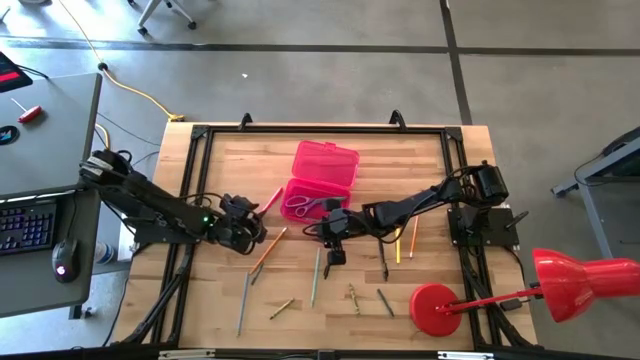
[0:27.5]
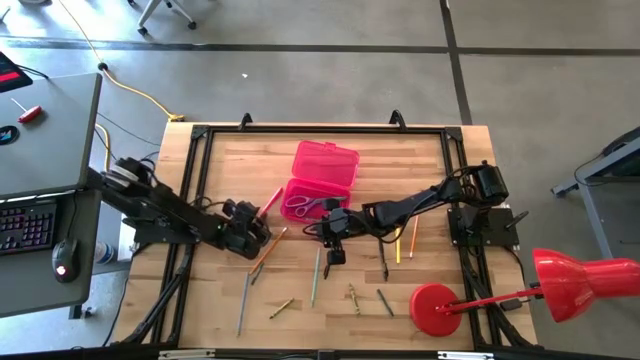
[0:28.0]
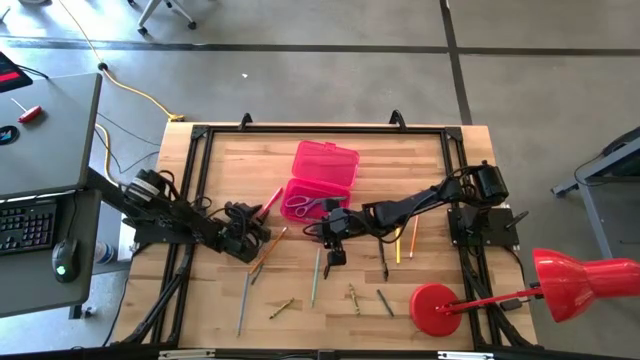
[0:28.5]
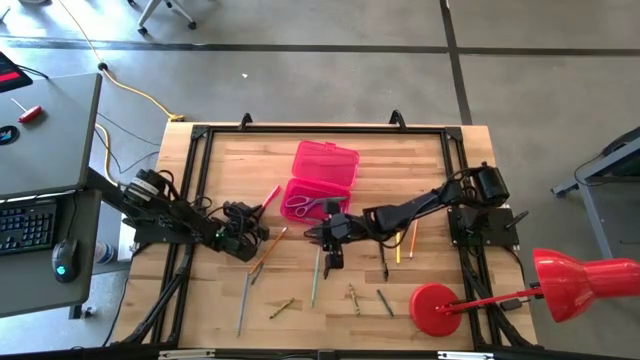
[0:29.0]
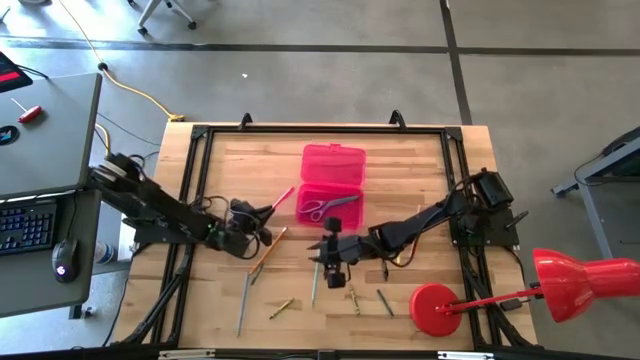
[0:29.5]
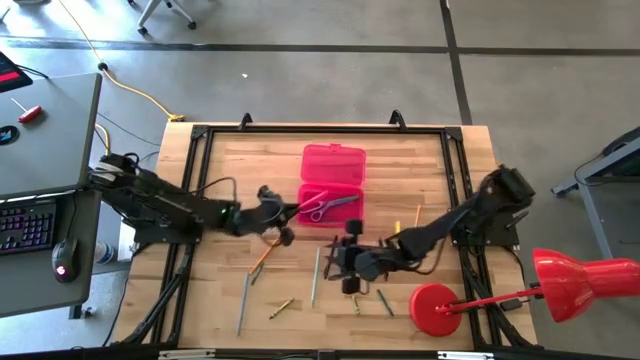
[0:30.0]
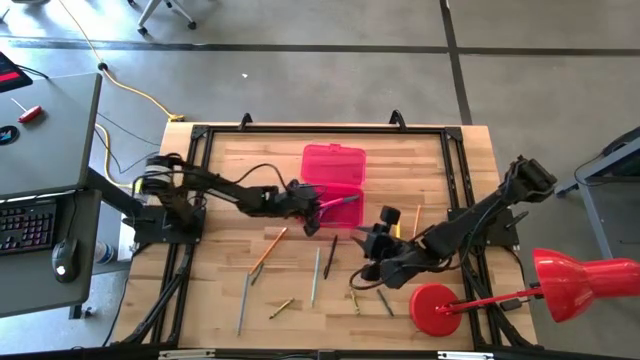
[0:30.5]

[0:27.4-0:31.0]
Task: Pick & place school supplies into a supply box
Put the pink pen into the pink supply box

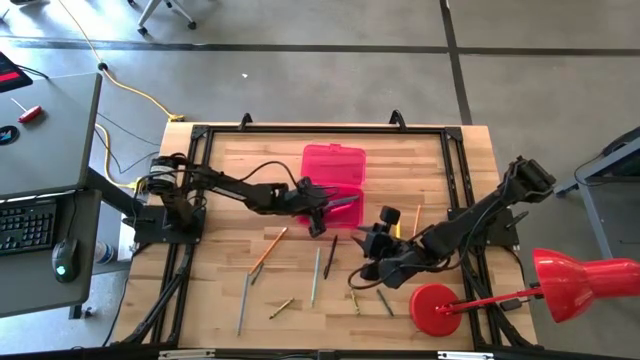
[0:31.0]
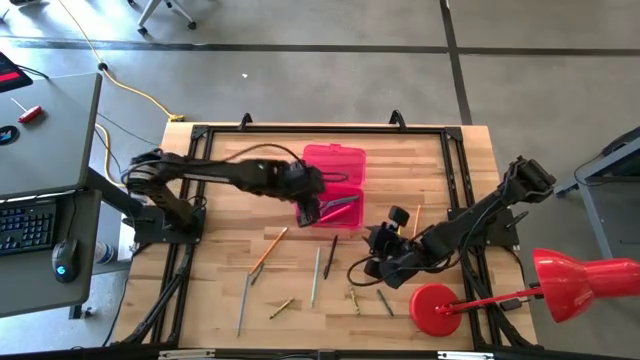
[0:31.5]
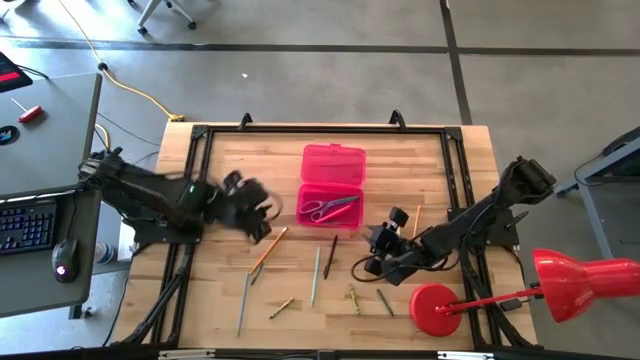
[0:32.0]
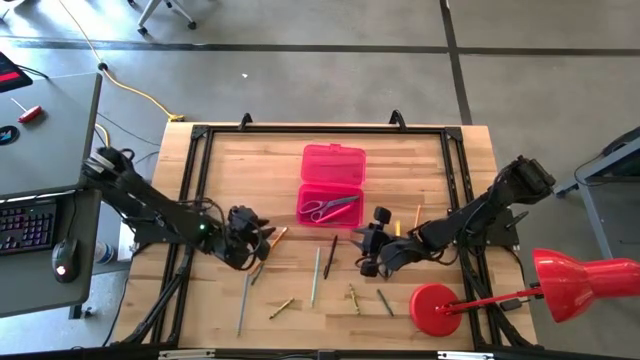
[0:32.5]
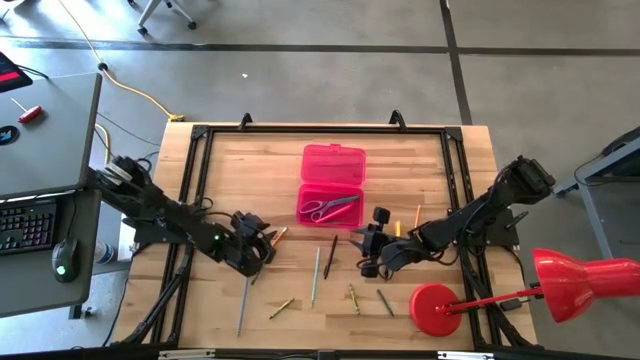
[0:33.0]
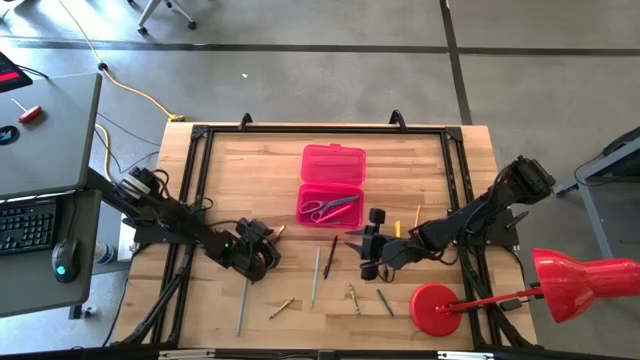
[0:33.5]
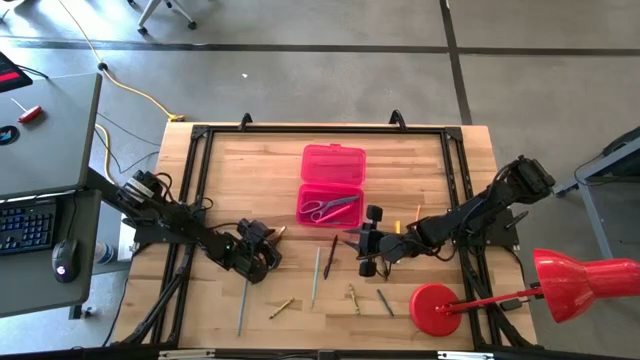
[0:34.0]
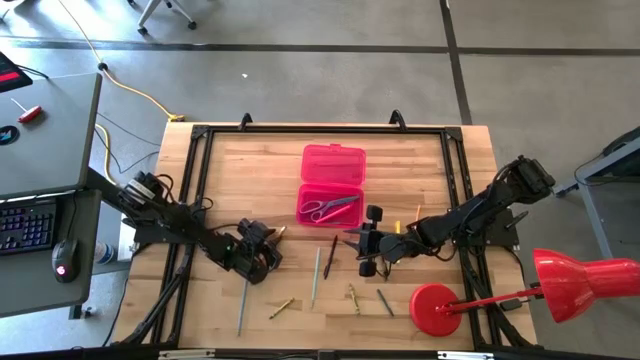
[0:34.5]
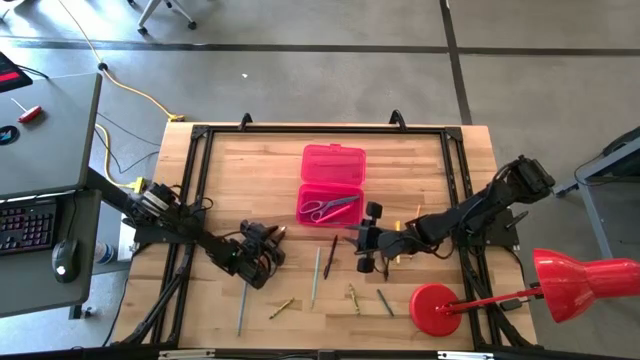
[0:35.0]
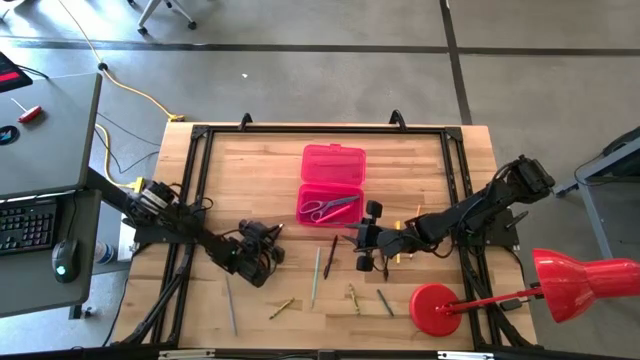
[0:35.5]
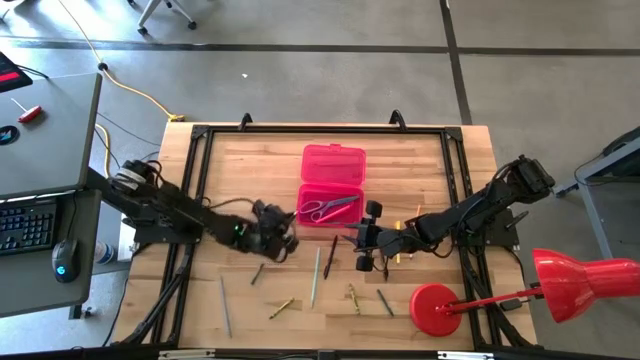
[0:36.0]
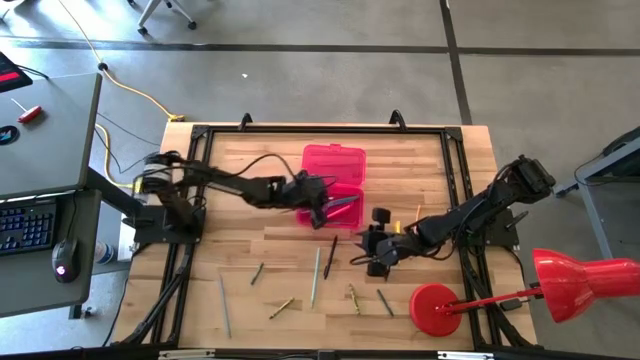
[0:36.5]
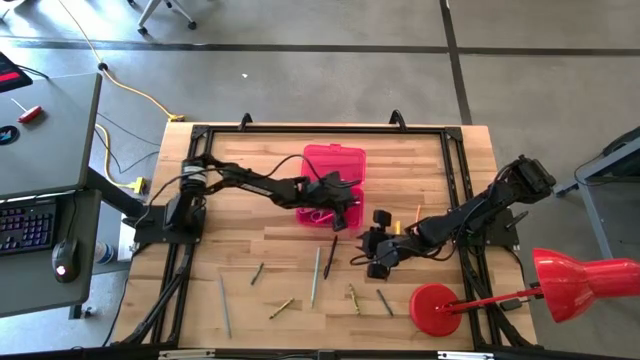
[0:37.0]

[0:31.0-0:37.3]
Put the left yellow pencil into the pink supply box

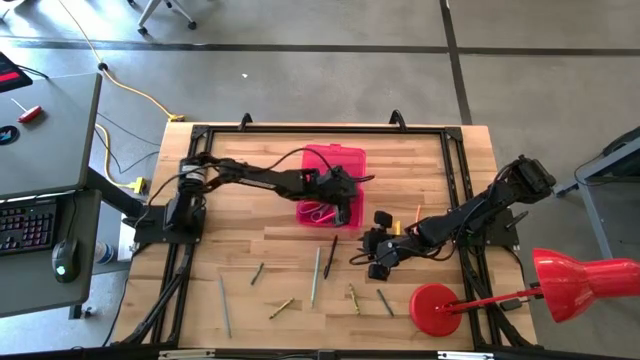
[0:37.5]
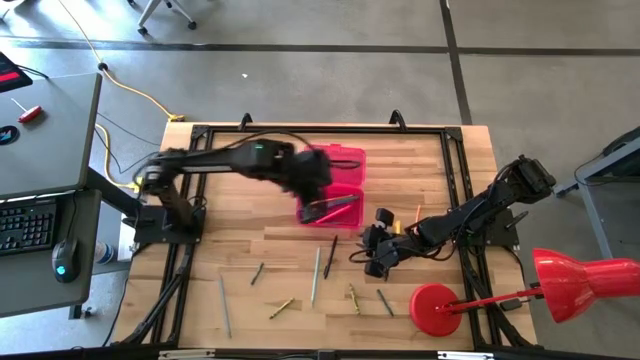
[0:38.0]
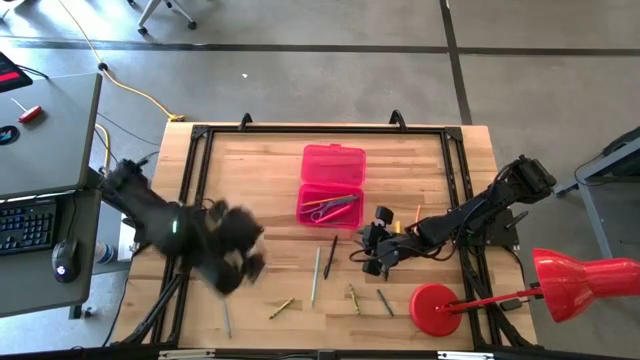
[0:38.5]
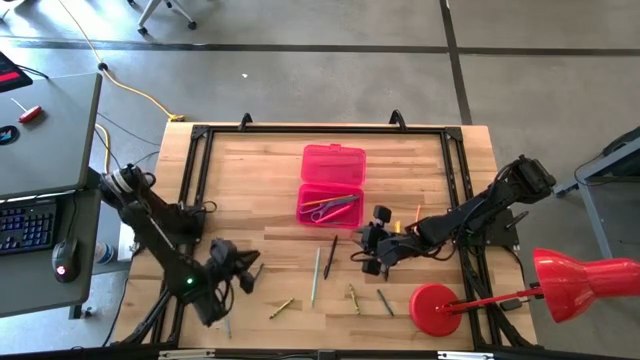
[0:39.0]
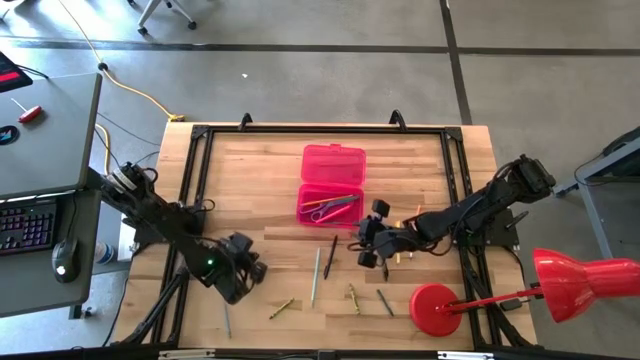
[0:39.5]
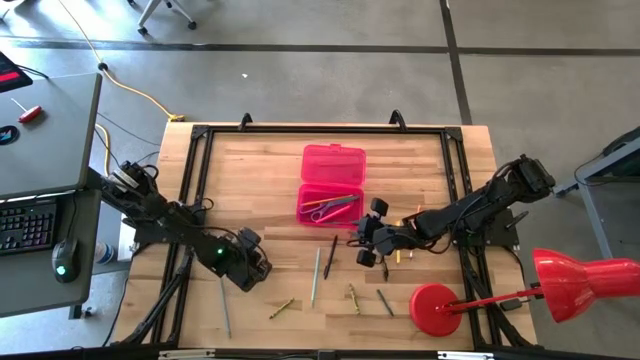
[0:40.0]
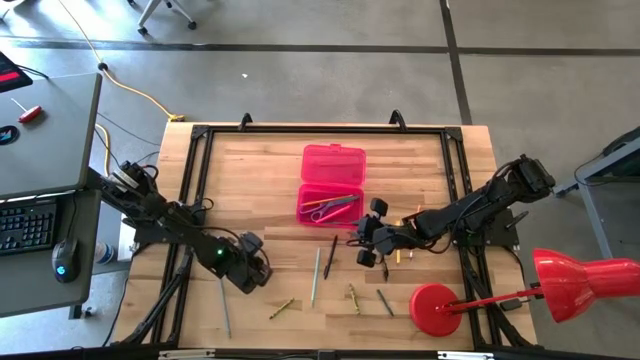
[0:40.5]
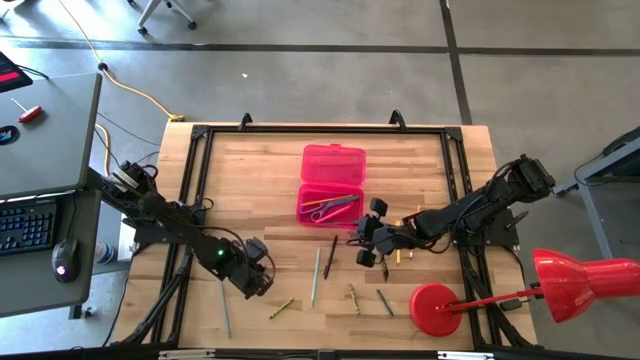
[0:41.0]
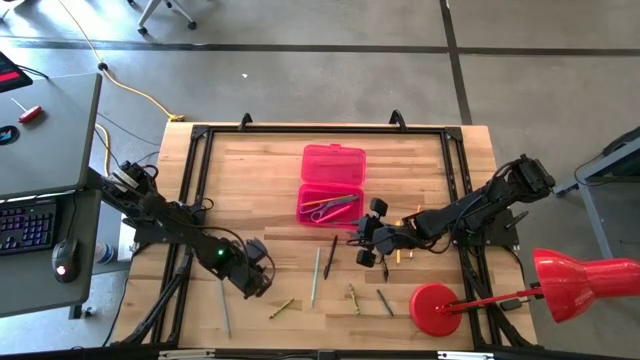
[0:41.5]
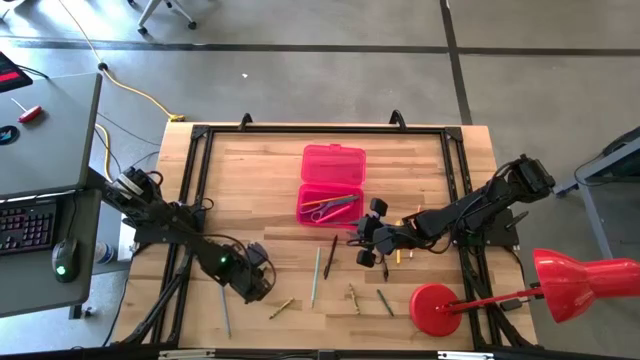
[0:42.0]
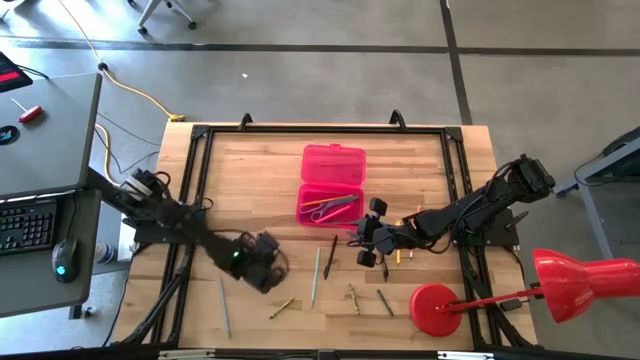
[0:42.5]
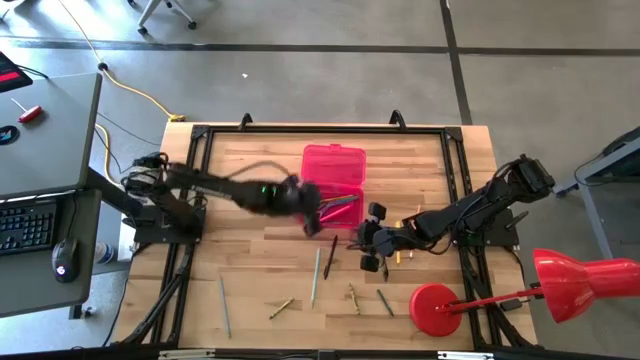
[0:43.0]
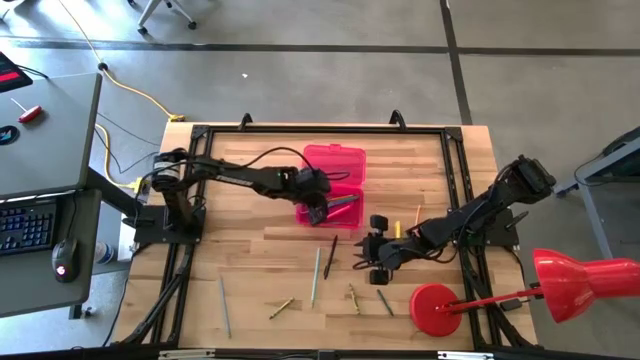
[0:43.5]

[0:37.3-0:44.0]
Put the left dark green crayon into the pink supply box

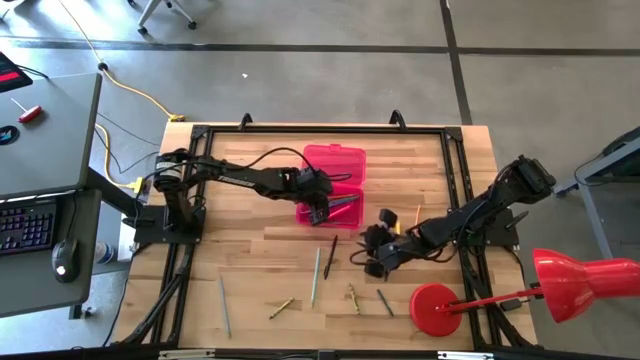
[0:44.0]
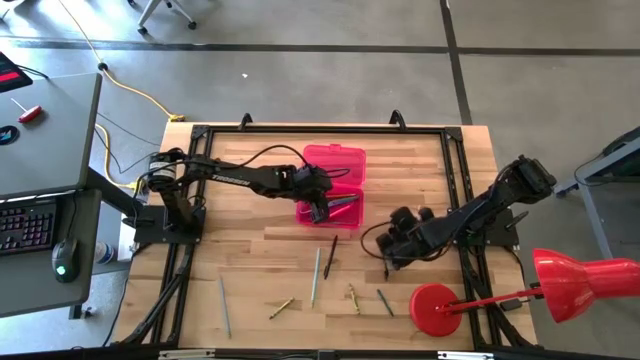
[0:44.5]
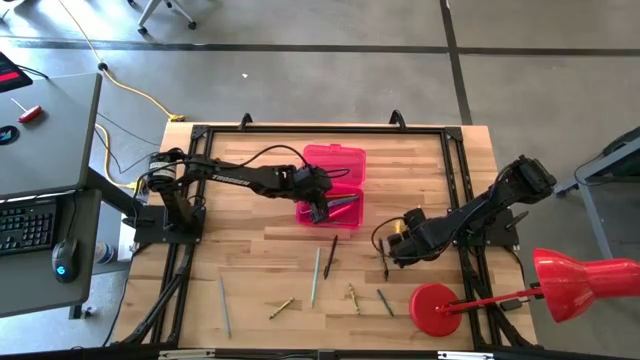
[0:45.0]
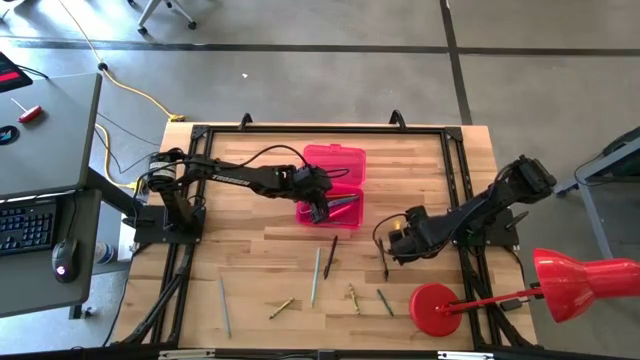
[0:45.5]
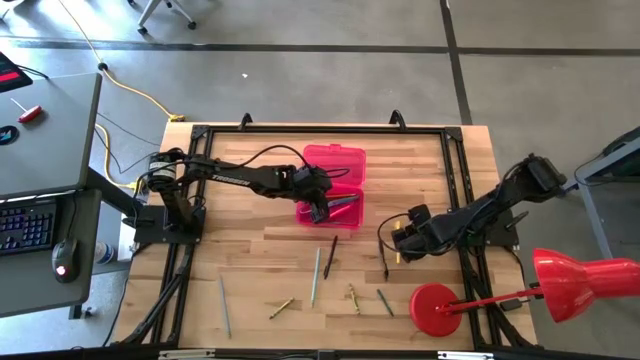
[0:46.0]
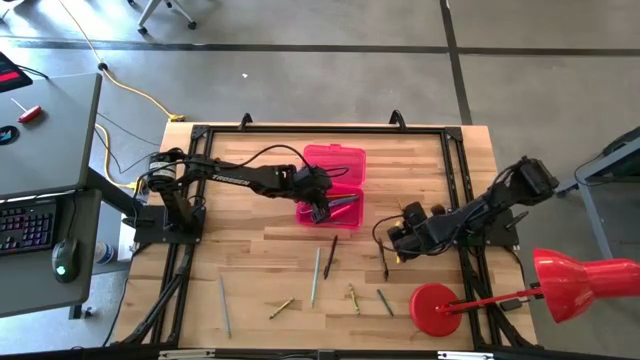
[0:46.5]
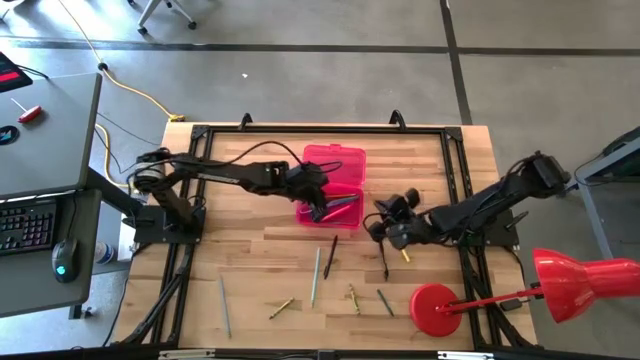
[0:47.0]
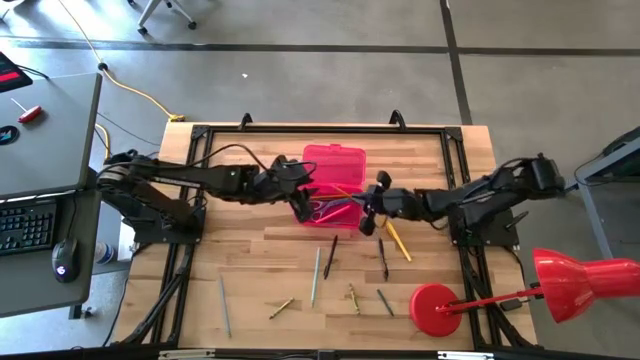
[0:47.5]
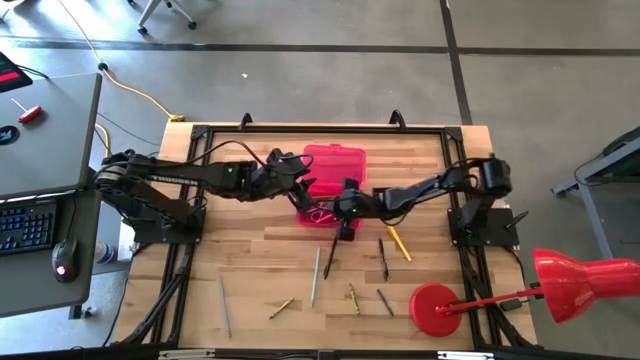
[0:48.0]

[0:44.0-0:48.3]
Put the yellow pencil into the pink supply box
